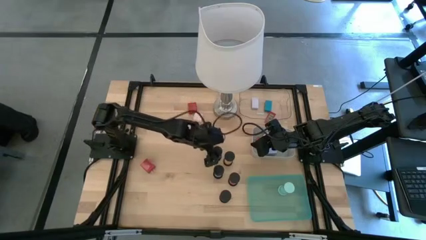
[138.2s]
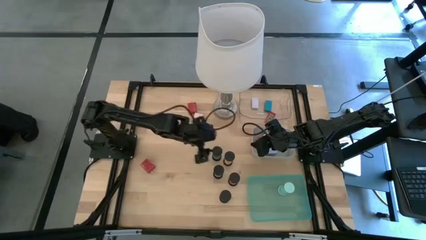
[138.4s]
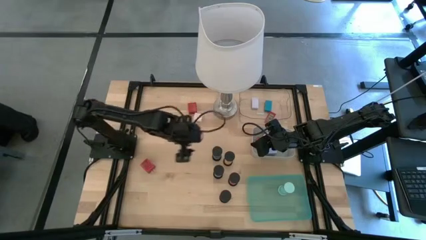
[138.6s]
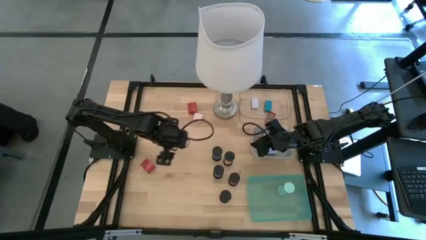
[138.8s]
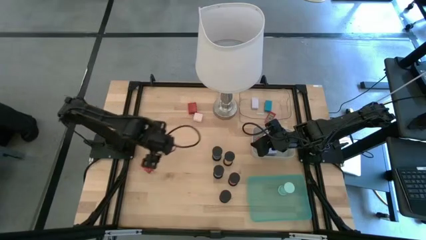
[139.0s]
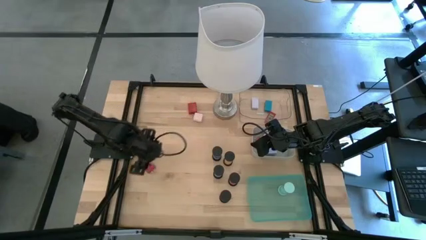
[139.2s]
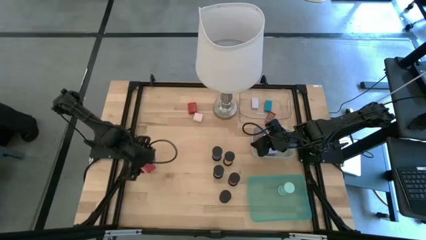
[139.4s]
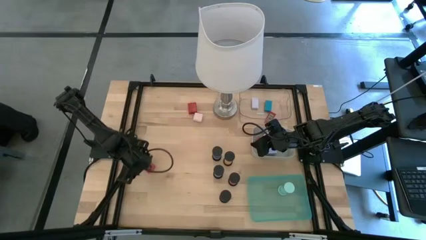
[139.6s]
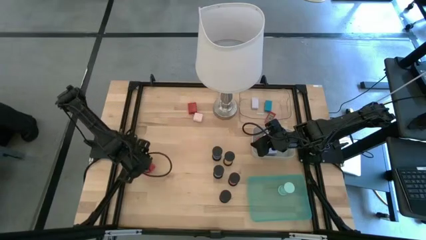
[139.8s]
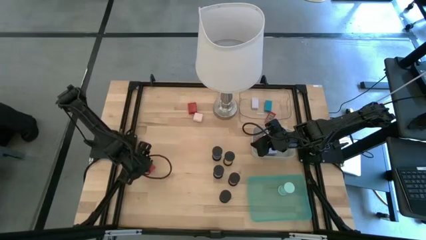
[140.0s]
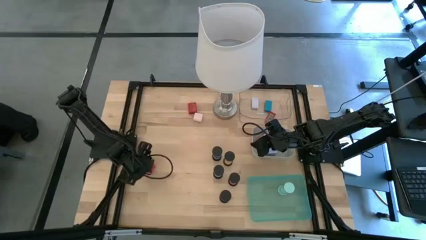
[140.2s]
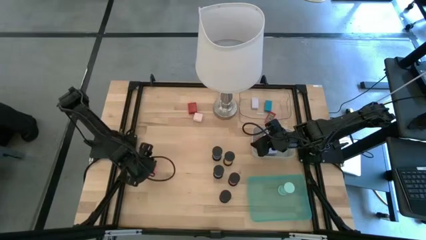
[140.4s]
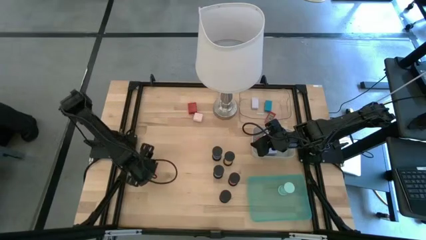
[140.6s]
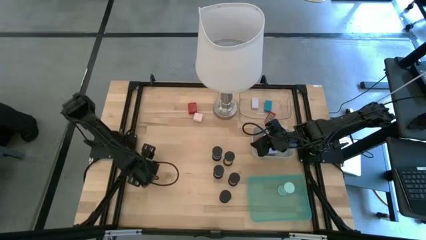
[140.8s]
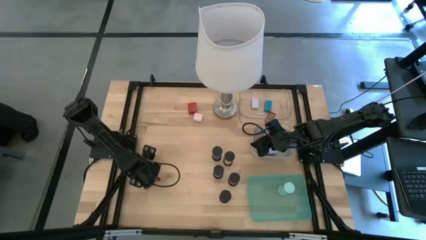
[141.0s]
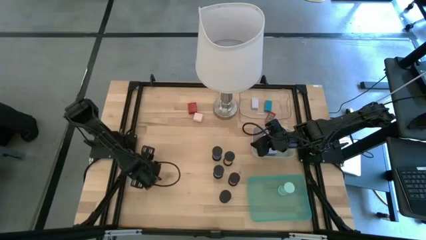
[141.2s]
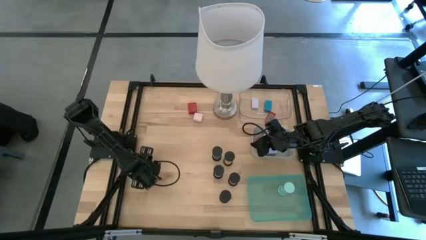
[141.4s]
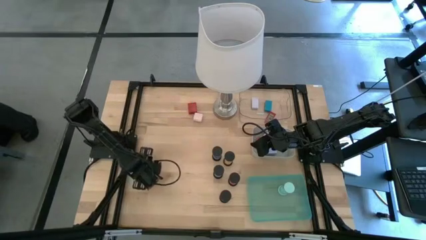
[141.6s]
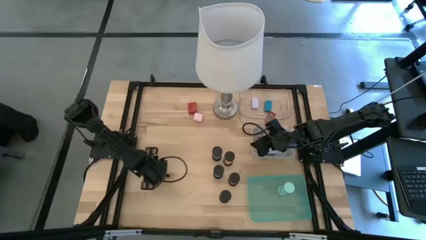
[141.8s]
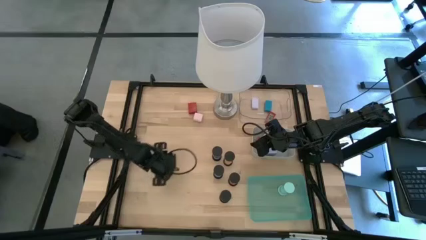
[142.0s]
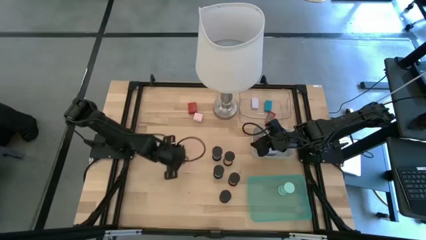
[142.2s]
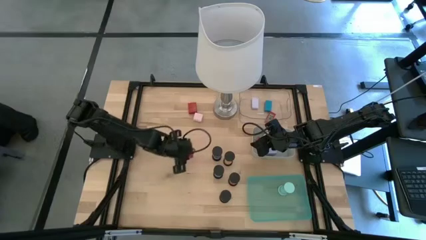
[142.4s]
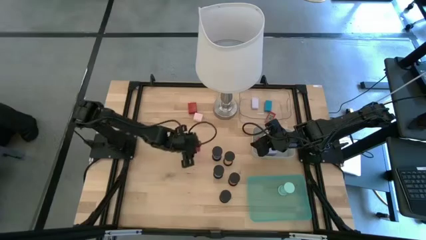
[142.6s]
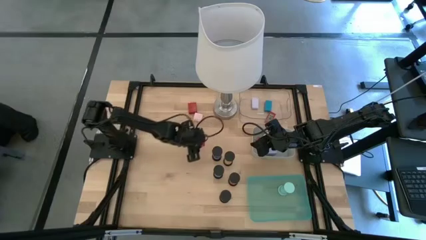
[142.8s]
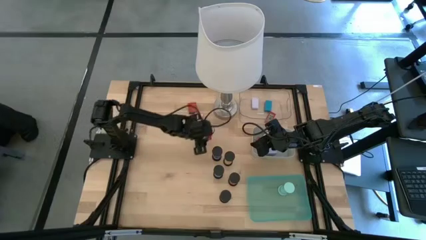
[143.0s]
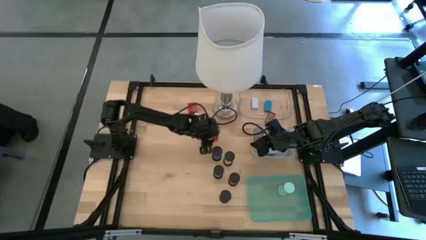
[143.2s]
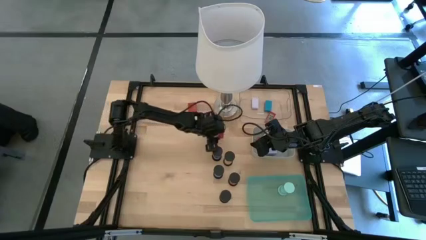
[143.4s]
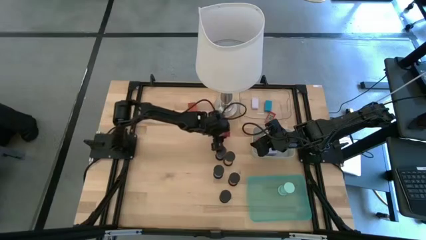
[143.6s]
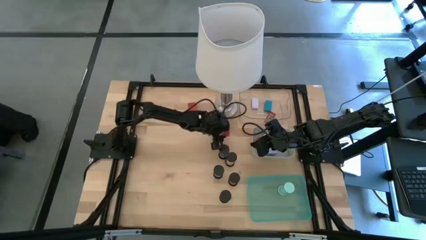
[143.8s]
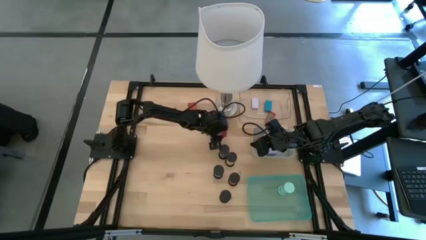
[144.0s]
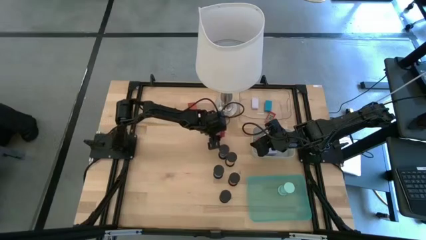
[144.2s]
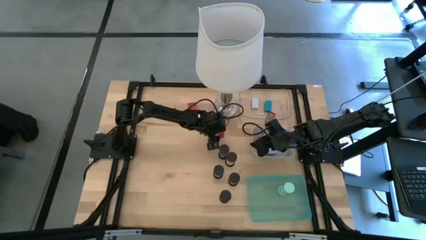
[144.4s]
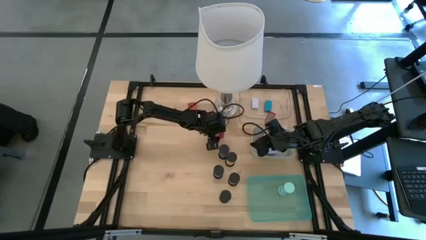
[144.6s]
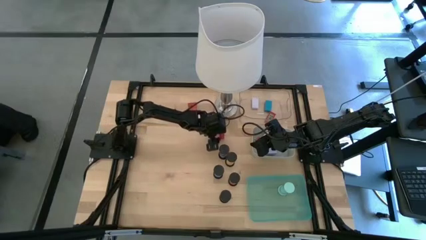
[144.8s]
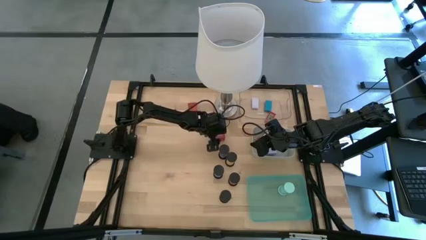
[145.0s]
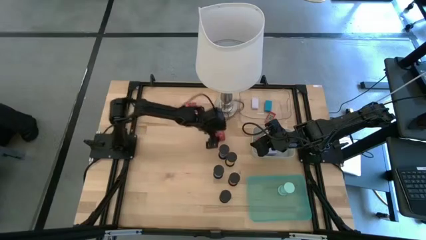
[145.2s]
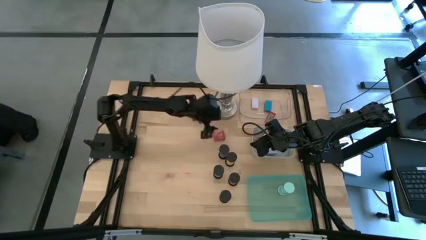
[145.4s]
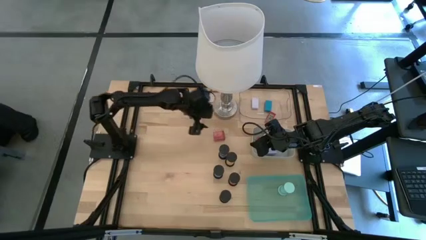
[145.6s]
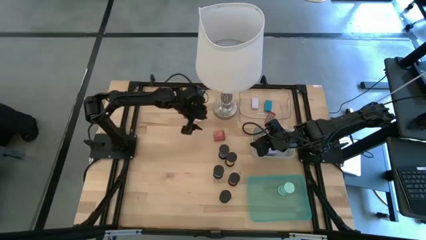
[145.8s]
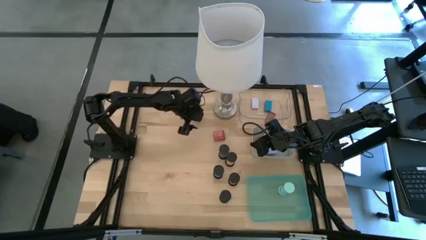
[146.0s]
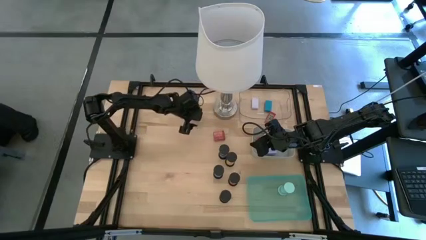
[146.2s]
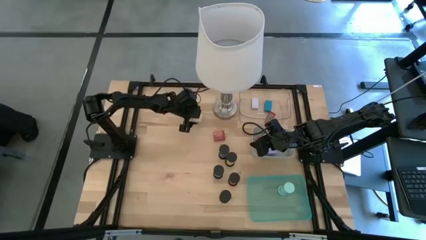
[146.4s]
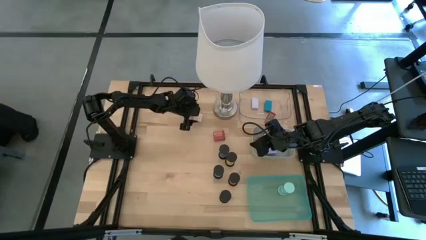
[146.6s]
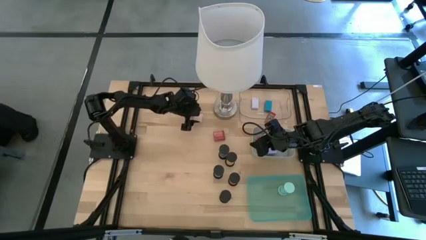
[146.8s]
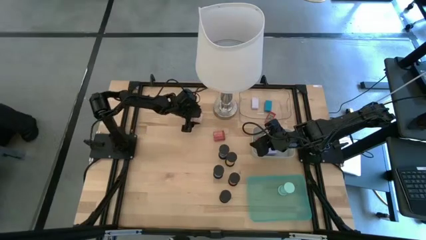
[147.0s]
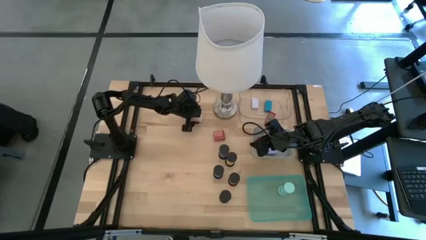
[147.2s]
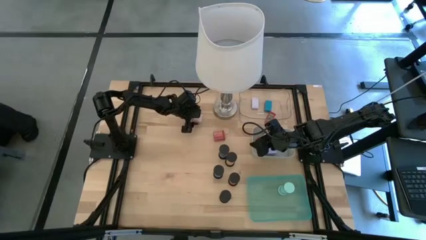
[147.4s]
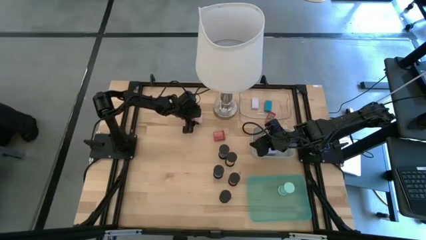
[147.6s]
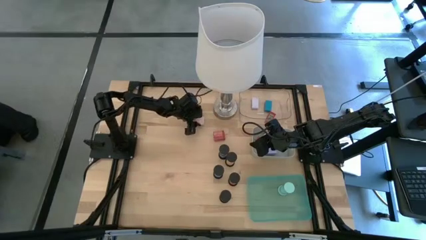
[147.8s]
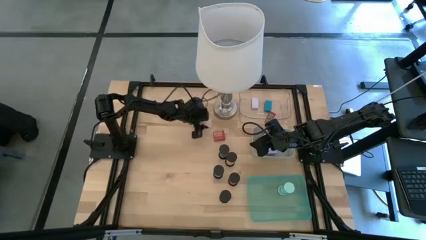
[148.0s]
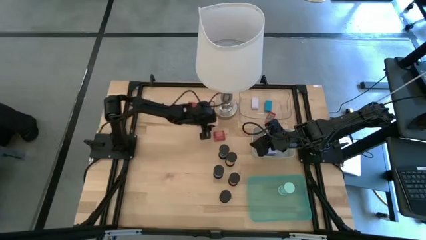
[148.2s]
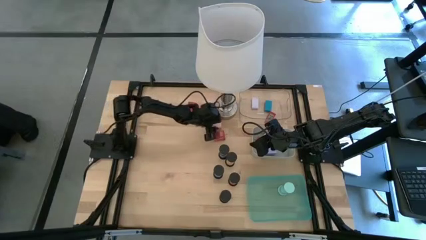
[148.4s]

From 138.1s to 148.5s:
Task: Pick & Place Office items
Move the charger adapters to the middle of the table
